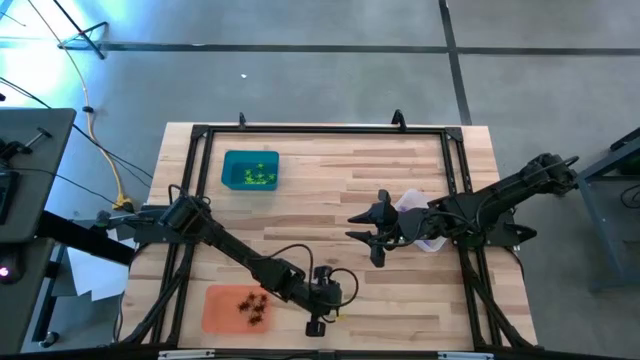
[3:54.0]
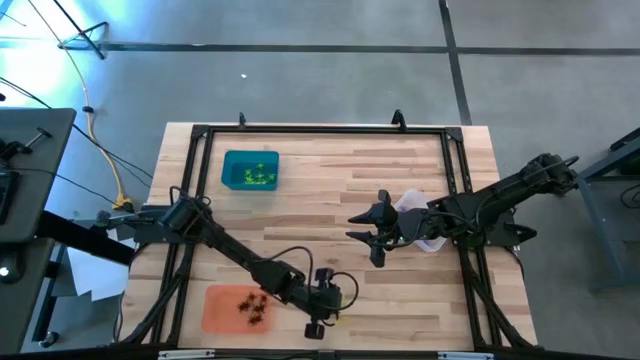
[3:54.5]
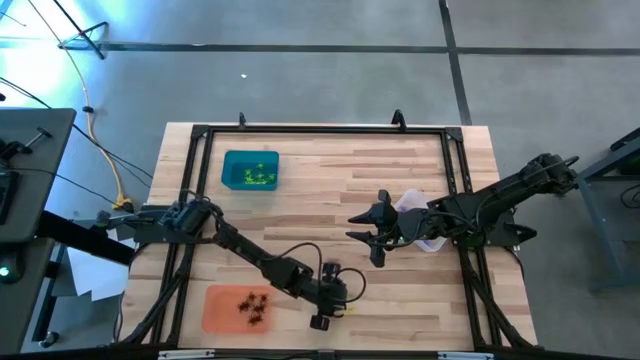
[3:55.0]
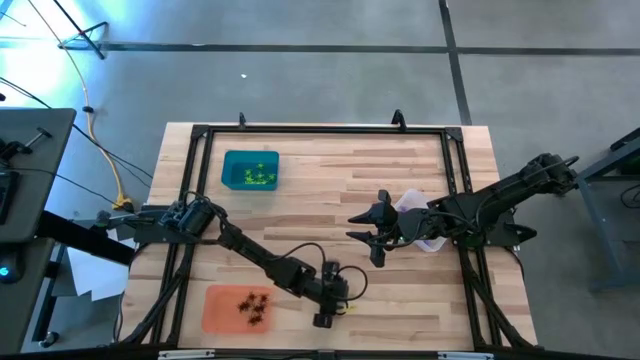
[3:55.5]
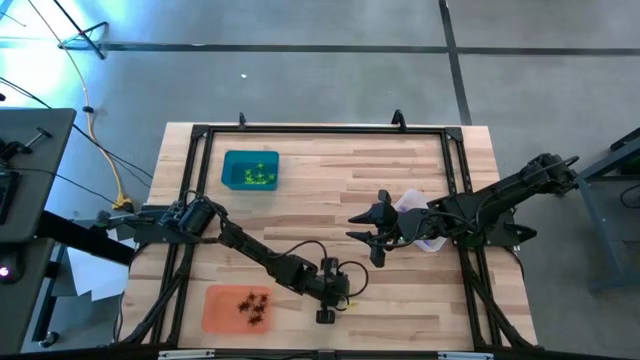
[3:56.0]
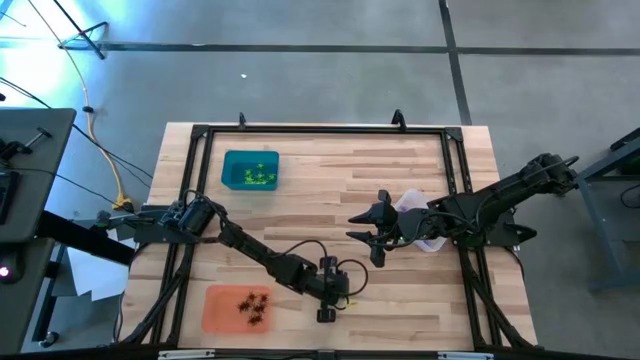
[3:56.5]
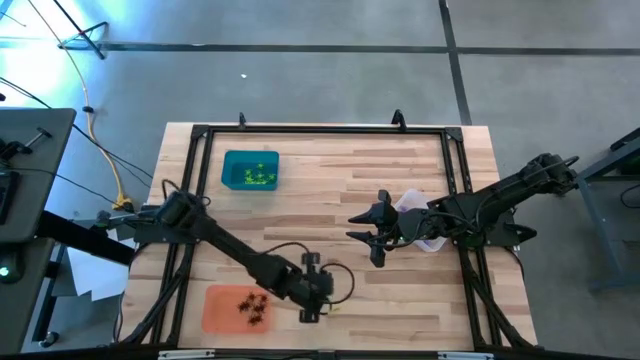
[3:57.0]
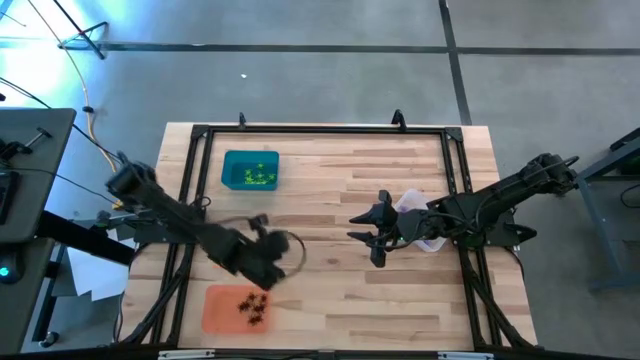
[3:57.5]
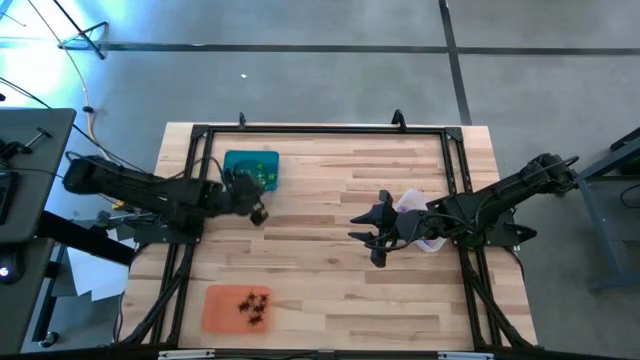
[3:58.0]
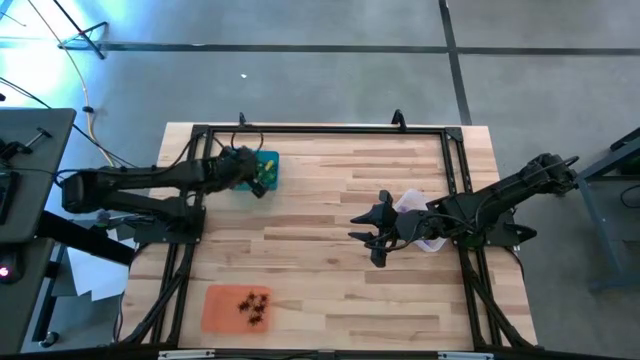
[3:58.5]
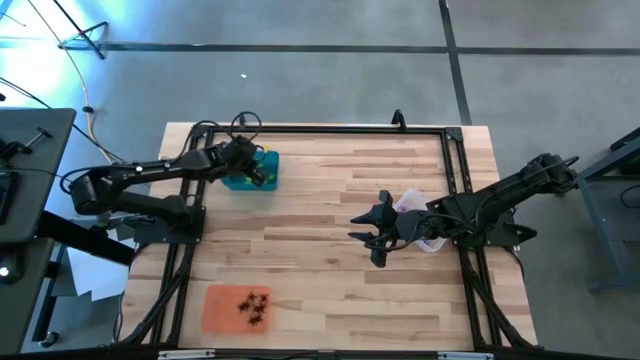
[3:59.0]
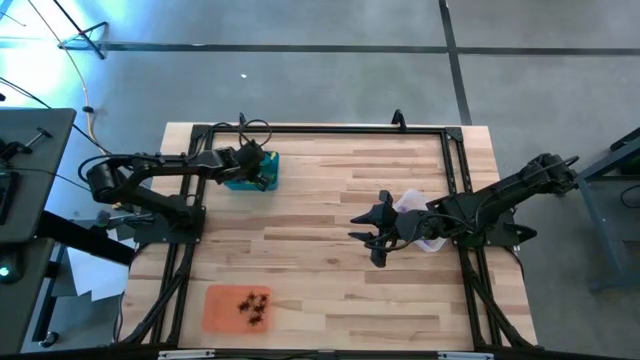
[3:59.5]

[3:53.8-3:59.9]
Task: Sort Halloween decoration
Put the green spider toy into the blue bin

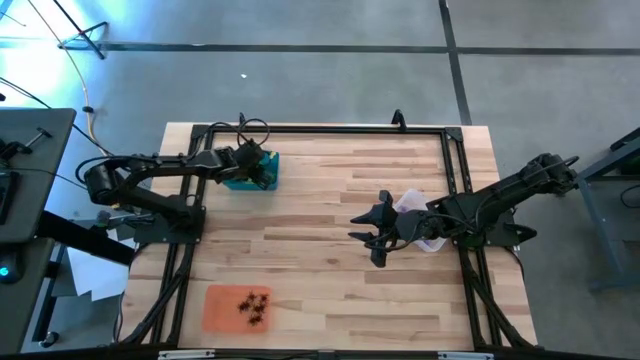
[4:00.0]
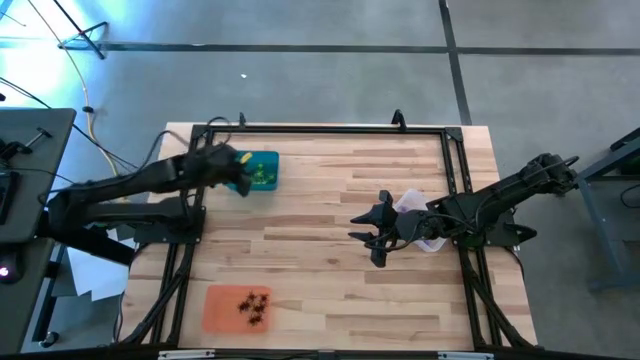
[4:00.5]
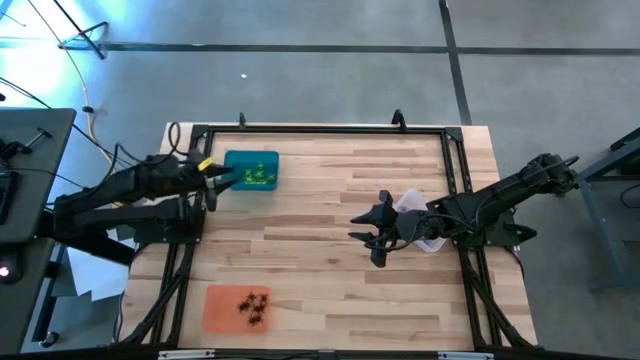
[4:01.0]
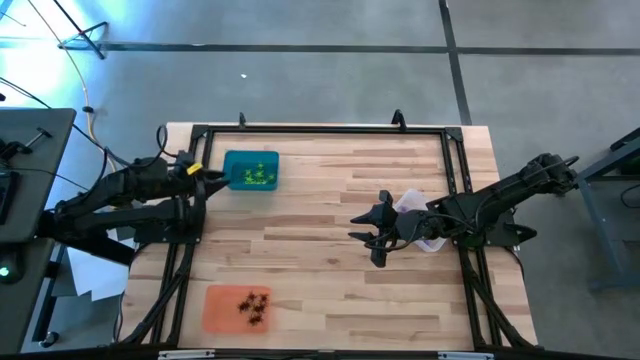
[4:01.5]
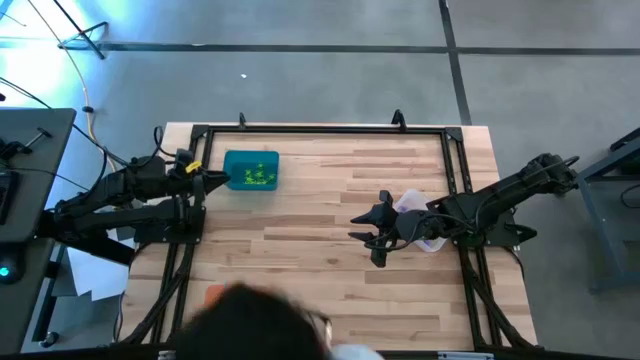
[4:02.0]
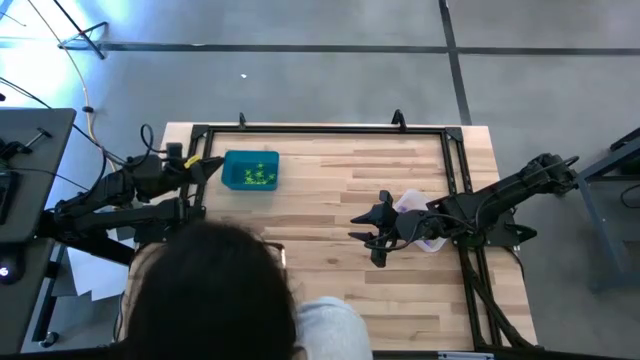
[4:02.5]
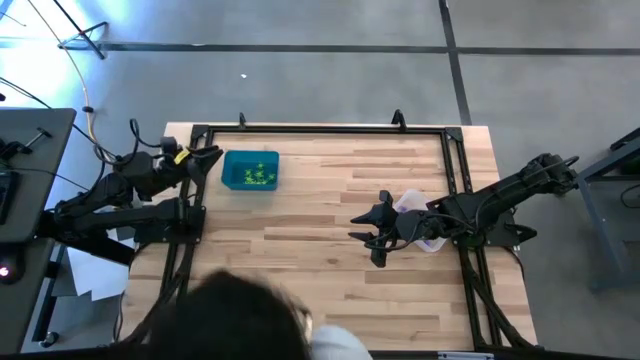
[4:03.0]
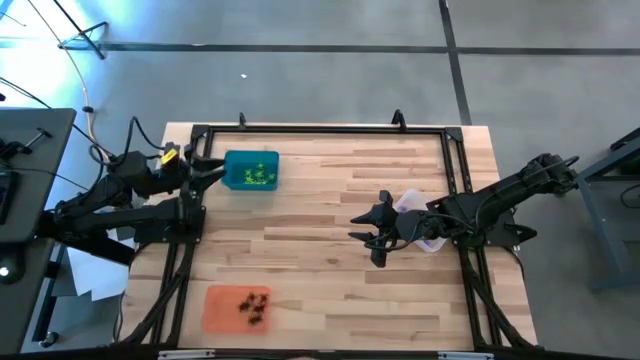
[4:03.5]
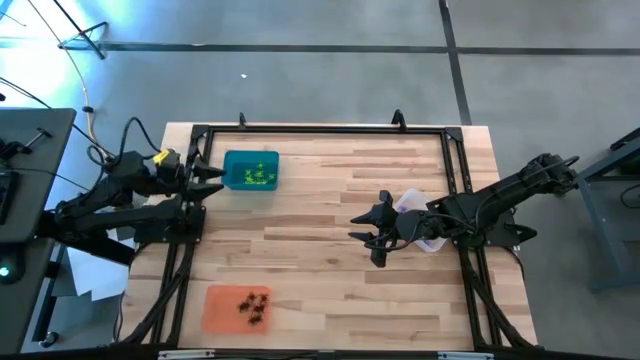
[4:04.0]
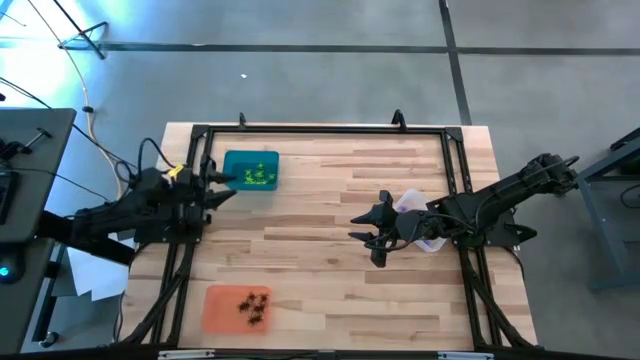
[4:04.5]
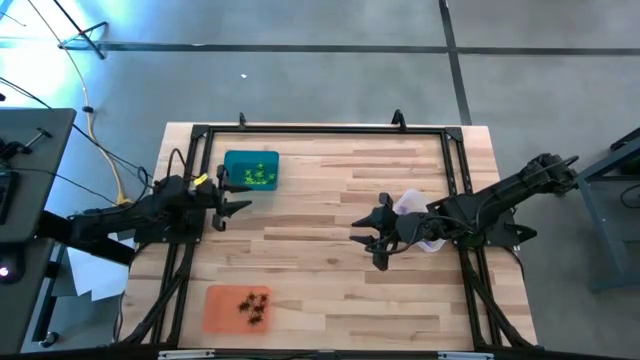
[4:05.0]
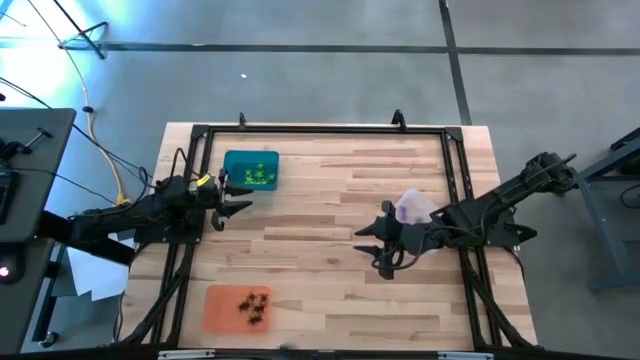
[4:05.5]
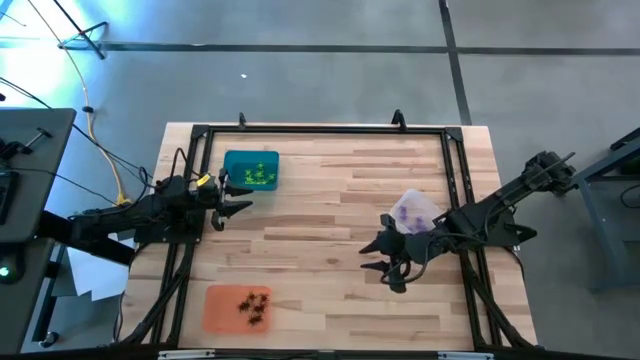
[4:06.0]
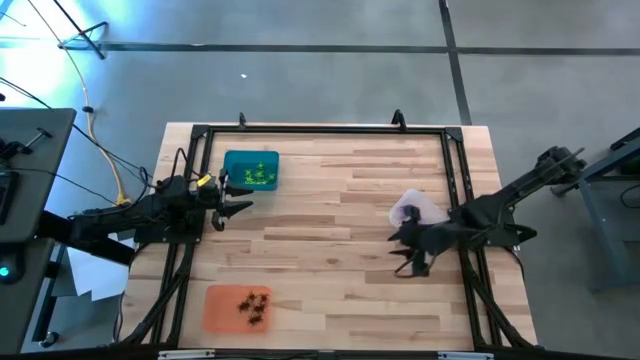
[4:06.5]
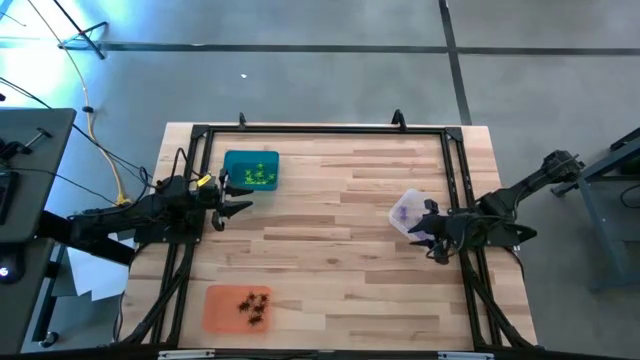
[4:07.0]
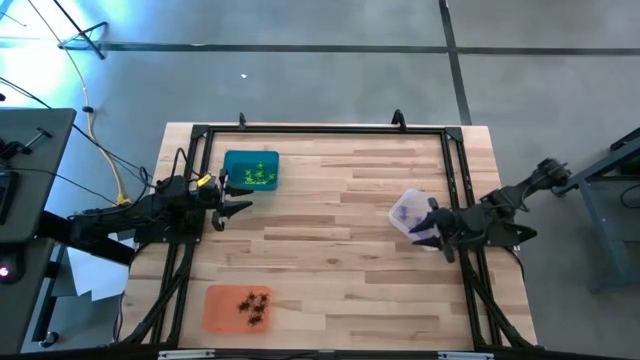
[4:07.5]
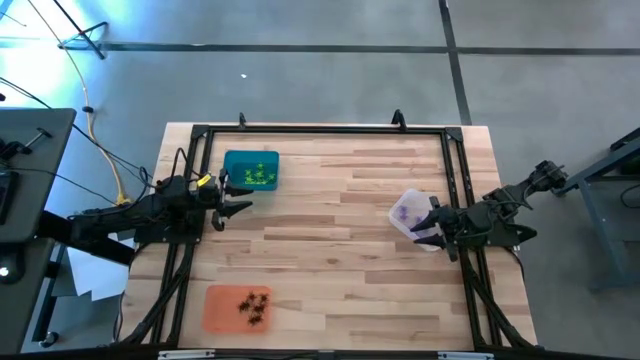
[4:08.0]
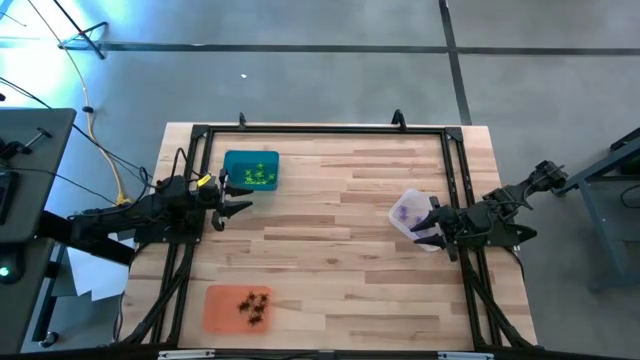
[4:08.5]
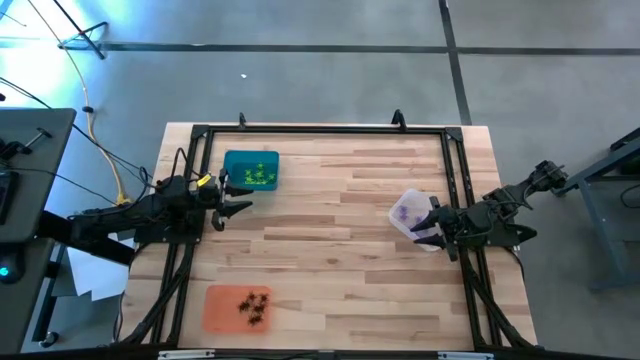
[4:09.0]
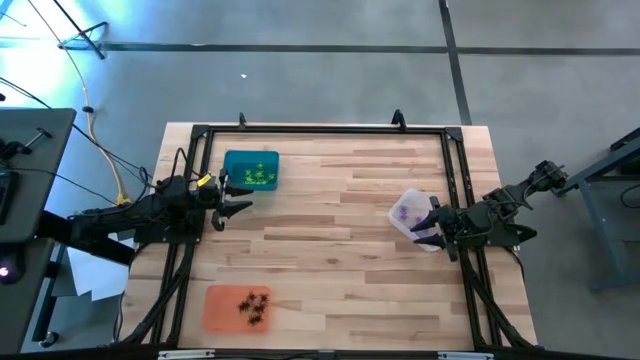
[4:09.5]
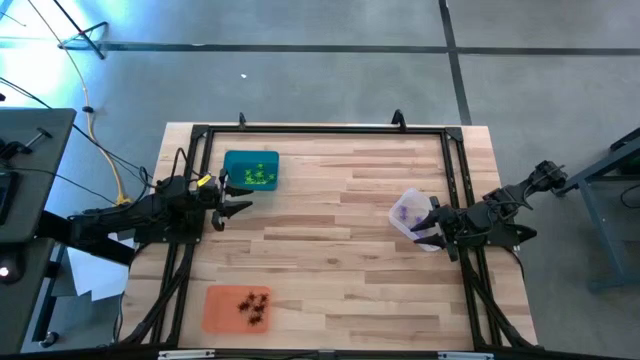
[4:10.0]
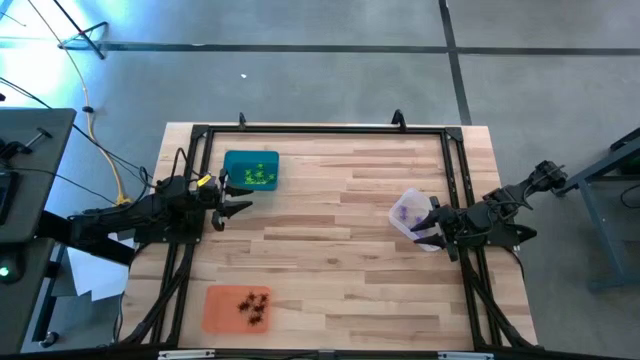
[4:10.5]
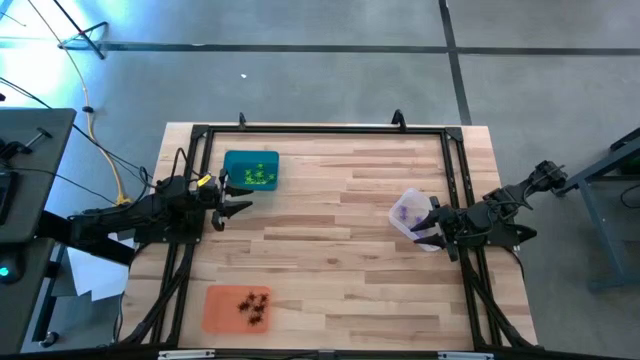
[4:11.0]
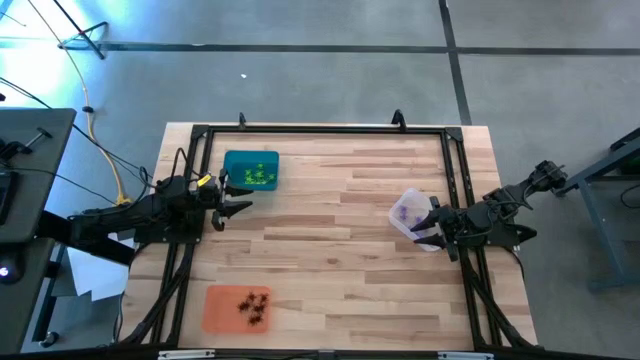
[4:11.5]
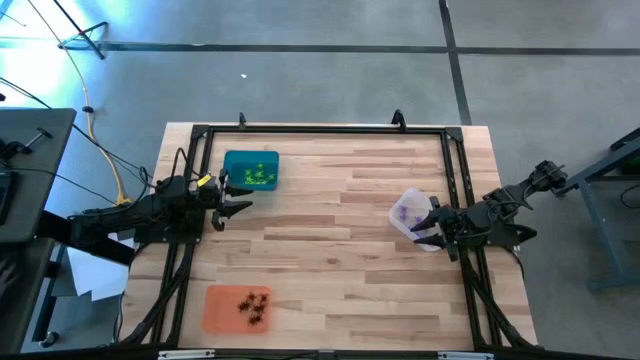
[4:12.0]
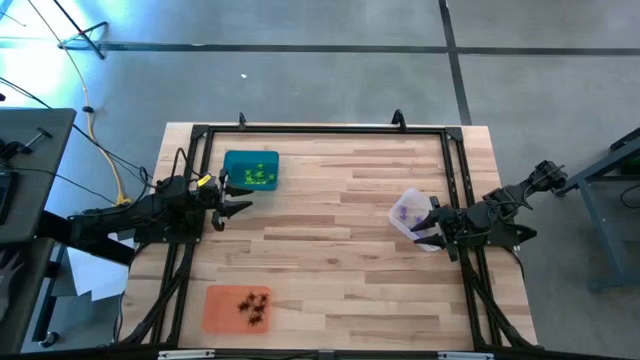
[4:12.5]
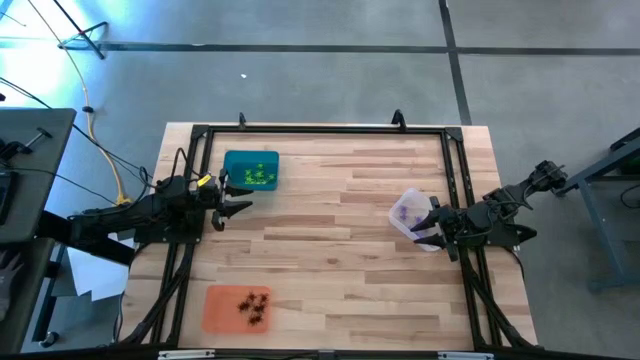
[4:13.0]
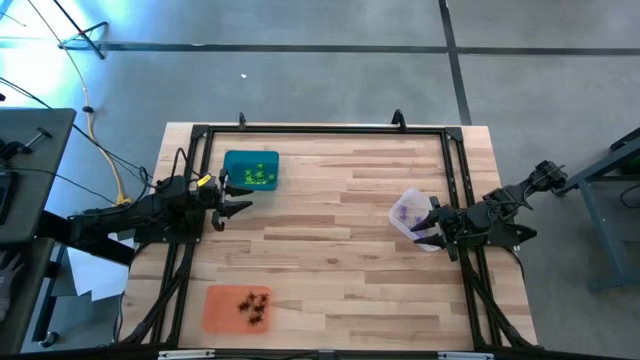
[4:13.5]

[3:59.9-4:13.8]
Return to Home Position

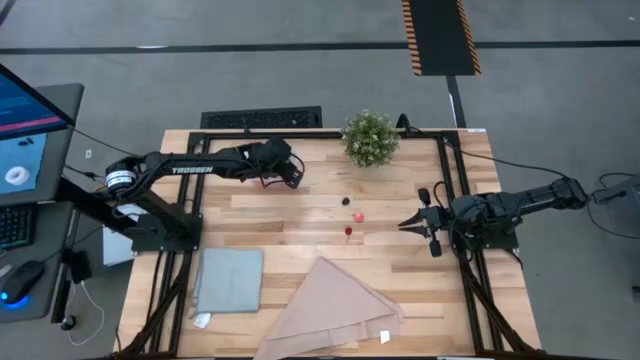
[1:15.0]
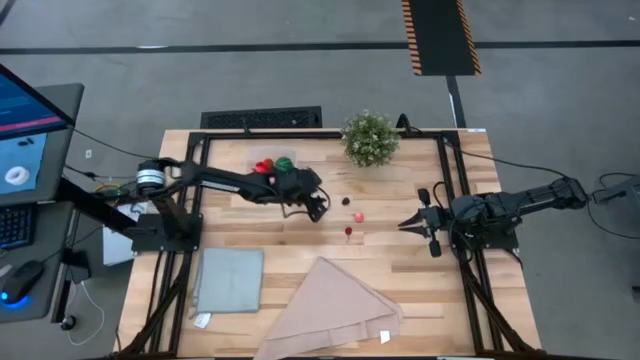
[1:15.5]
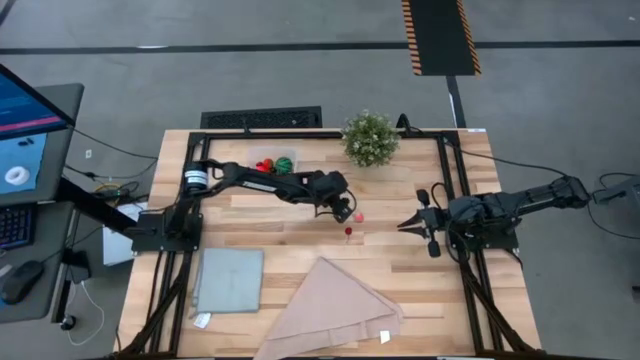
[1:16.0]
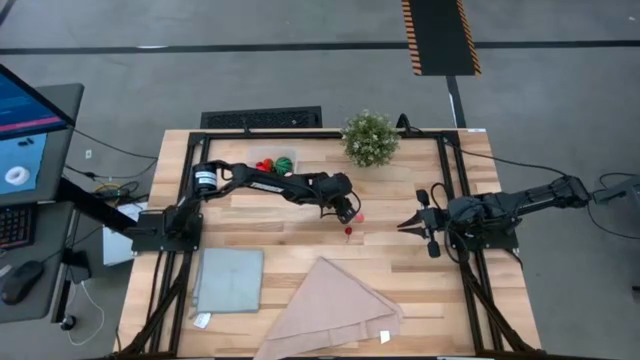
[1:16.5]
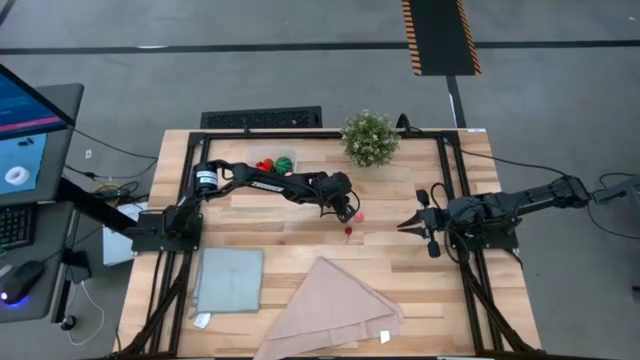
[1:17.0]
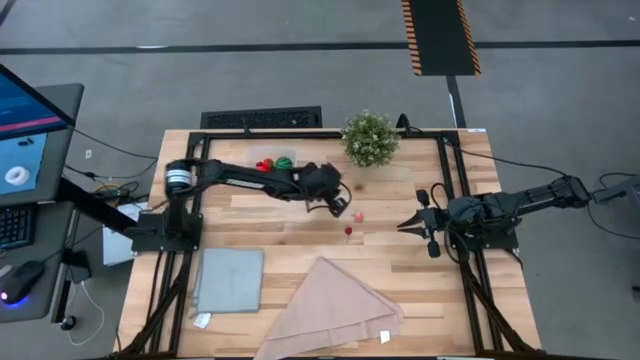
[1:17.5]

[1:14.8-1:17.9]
Task: Pick and placing Produce into tupperware
Put the blackberry into the transparent container
